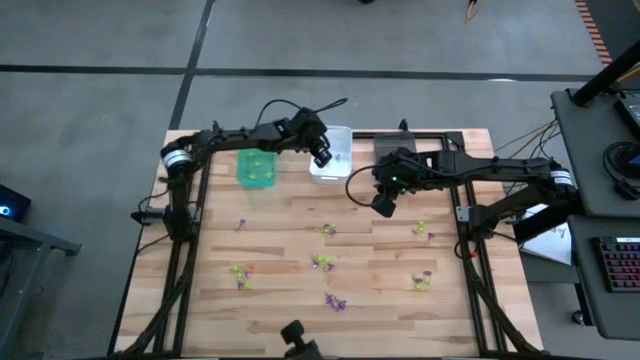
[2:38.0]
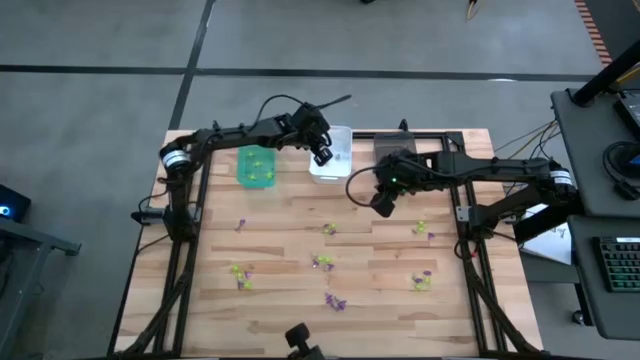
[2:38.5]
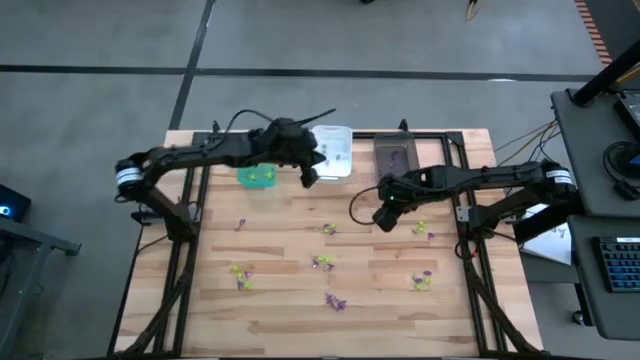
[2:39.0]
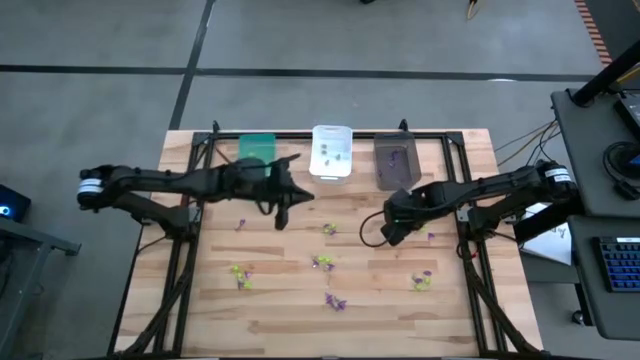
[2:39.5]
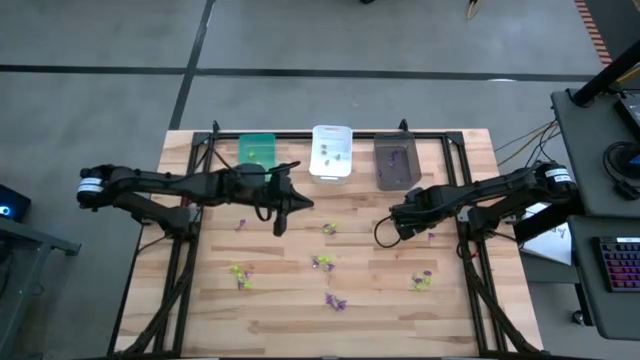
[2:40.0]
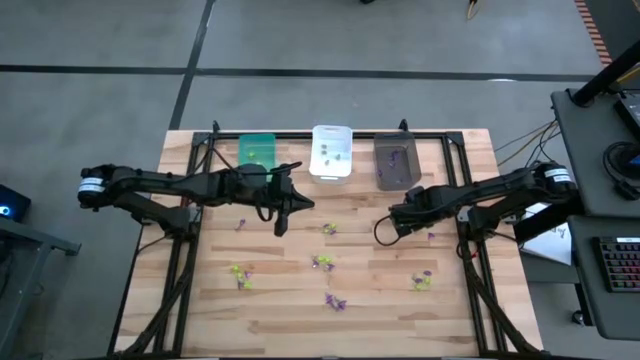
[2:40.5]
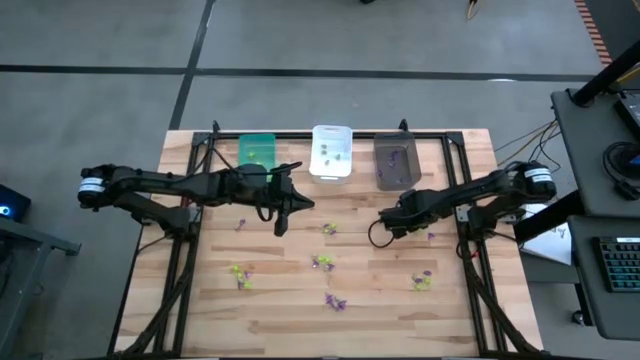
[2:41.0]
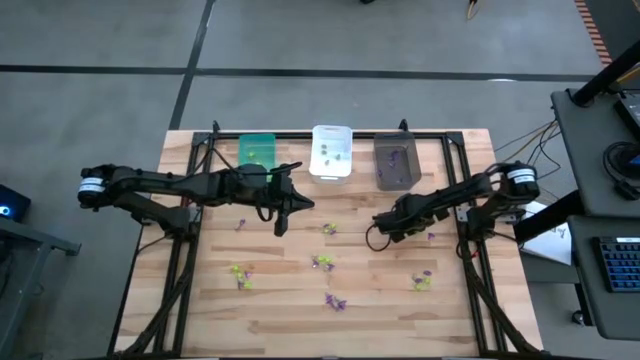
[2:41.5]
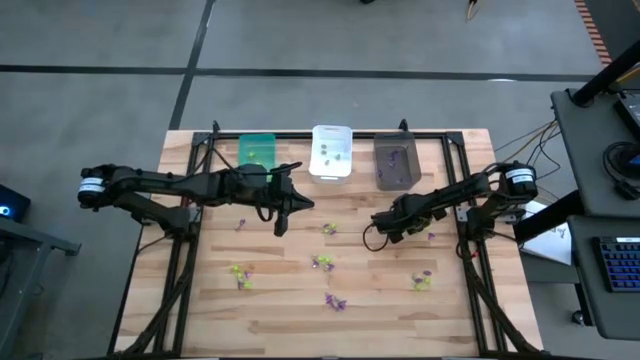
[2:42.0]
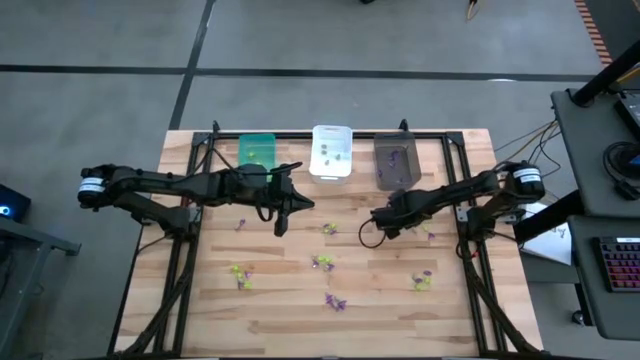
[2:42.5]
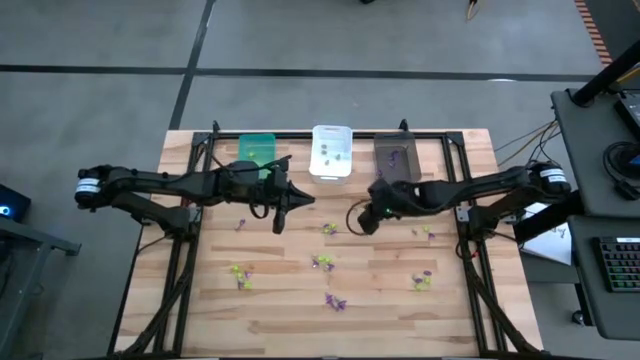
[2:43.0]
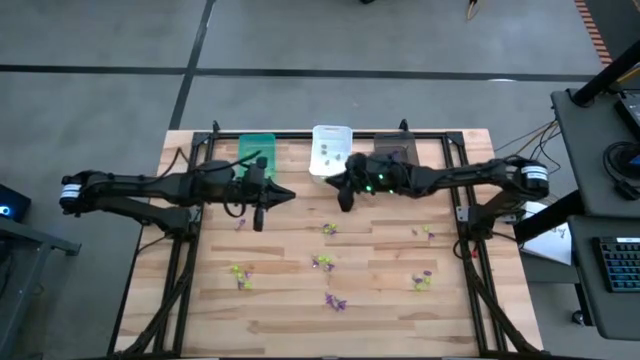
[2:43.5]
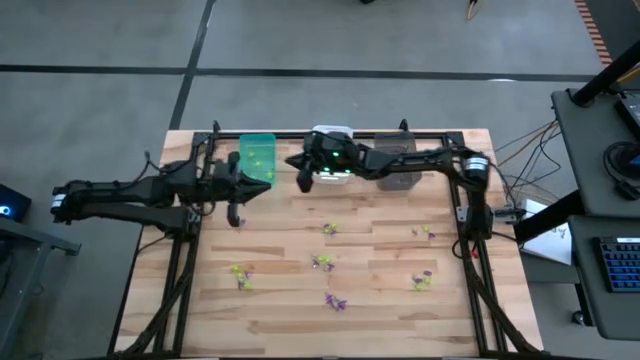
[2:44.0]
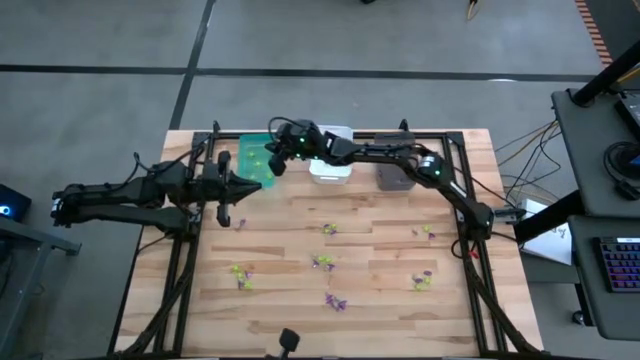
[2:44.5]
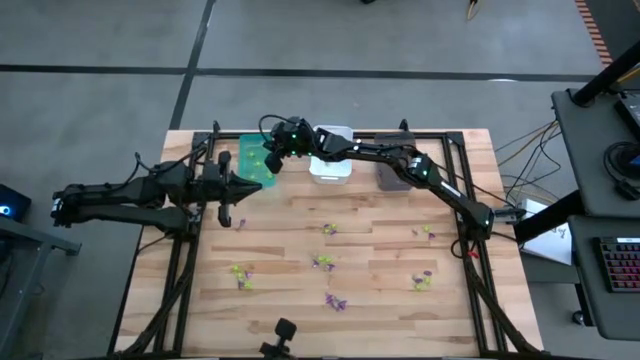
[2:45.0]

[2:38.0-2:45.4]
Task: Sort Halloween decoration
Put the green spider toy into the blue bin

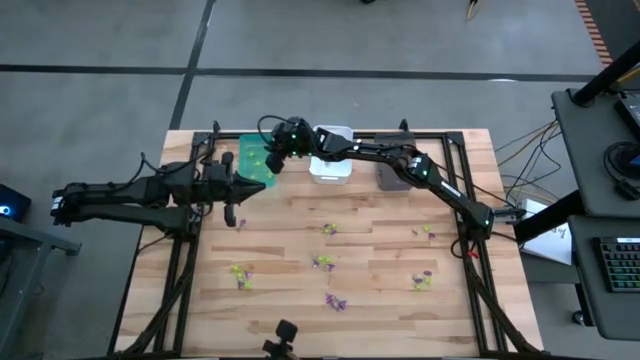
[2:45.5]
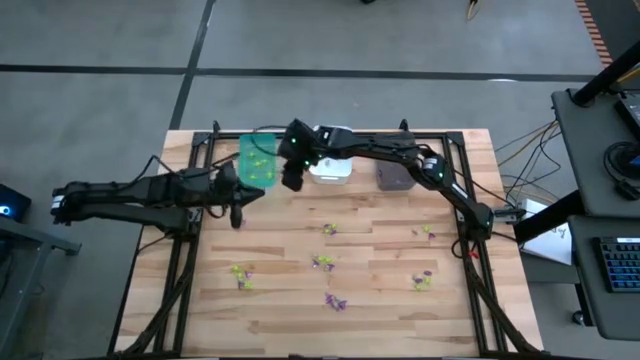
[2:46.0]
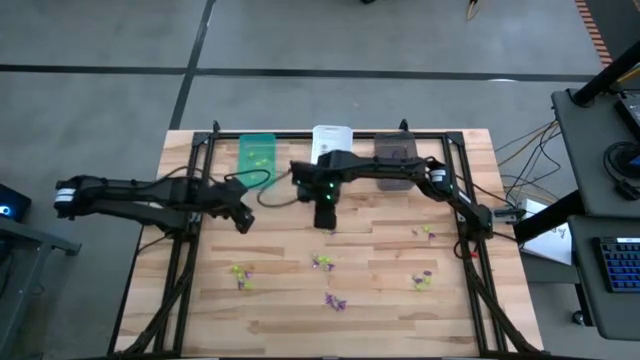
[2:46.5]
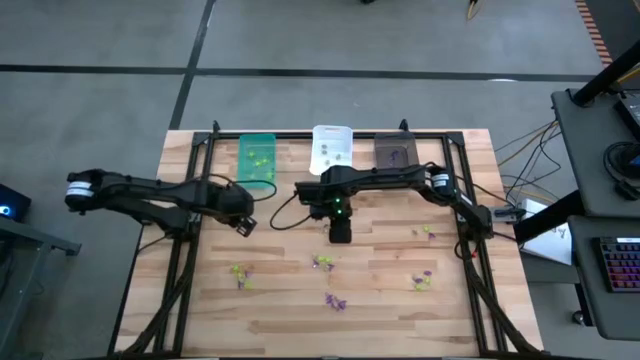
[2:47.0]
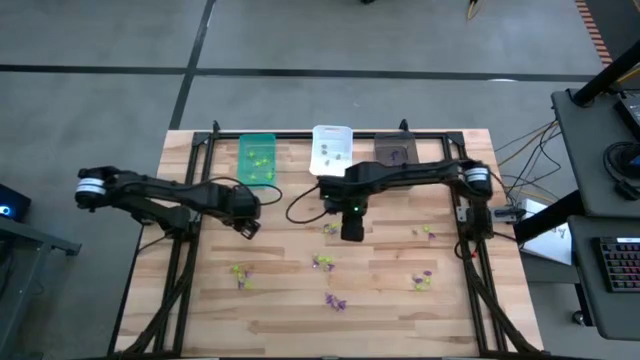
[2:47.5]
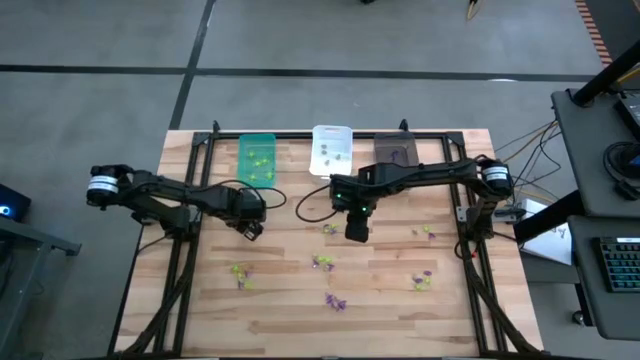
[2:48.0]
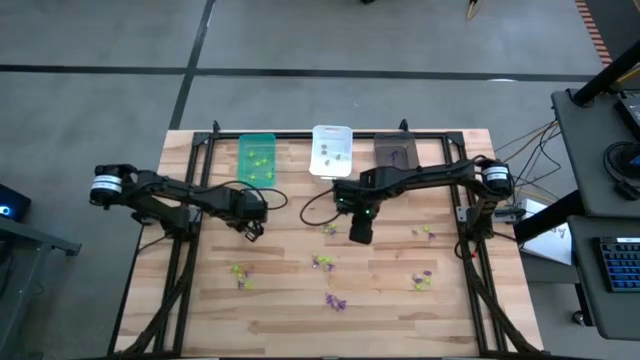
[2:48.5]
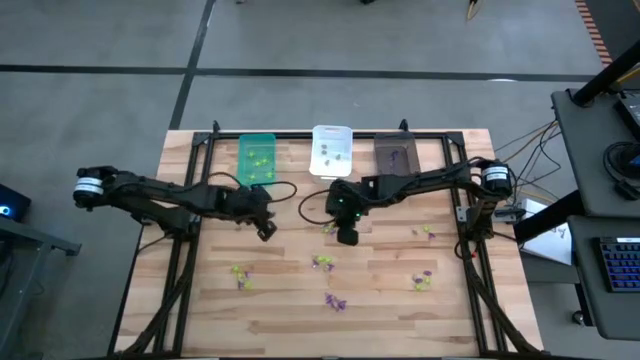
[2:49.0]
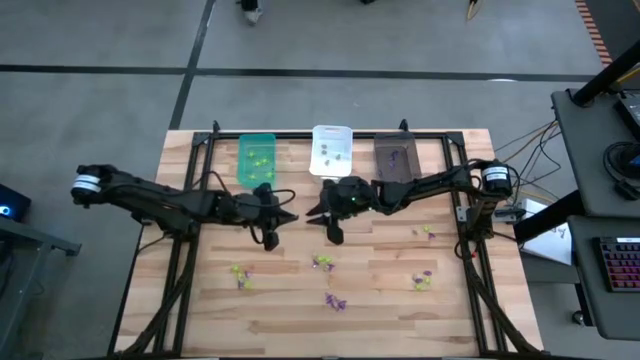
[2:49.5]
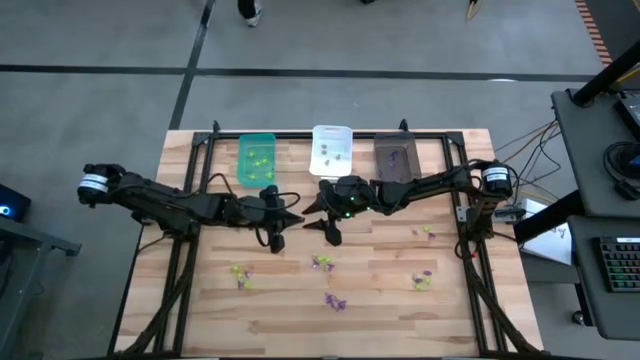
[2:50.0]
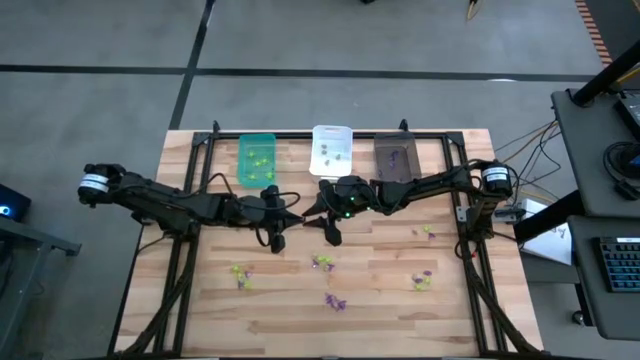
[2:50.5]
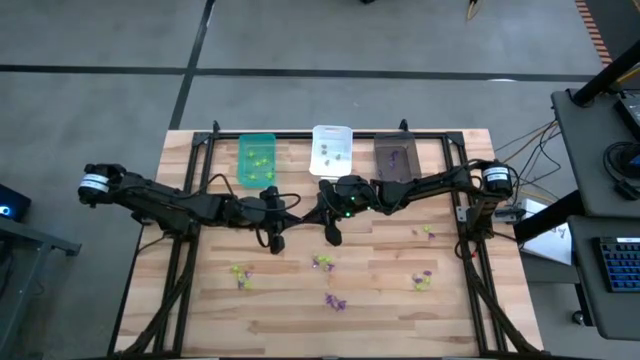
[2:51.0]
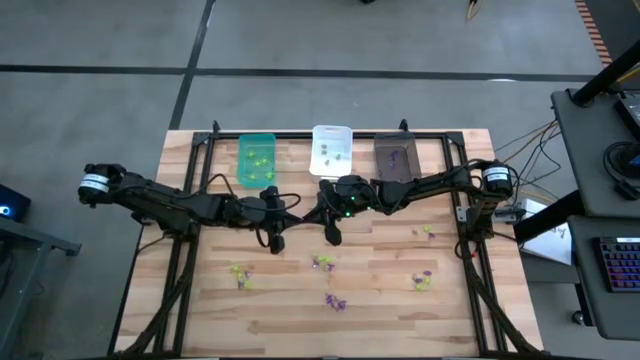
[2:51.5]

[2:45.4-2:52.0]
Put the purple witch hat toy into the gray bin

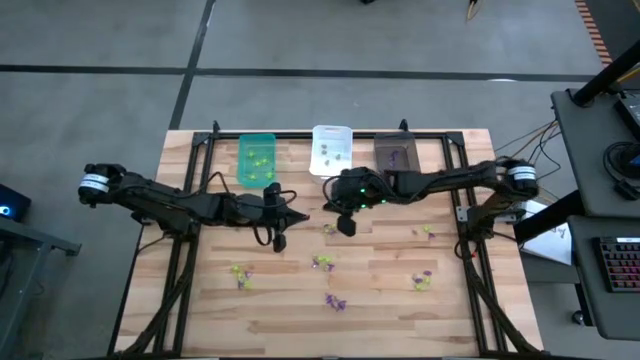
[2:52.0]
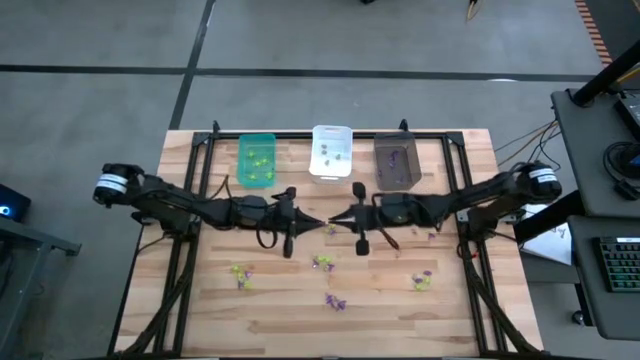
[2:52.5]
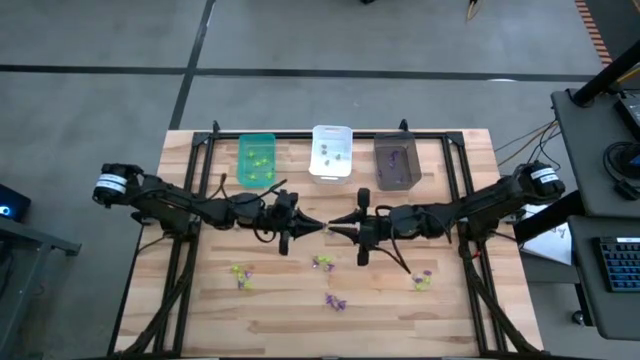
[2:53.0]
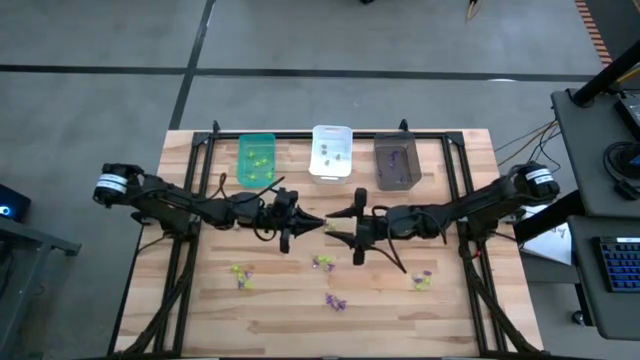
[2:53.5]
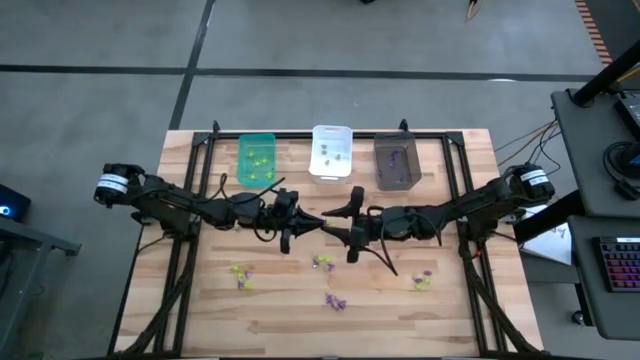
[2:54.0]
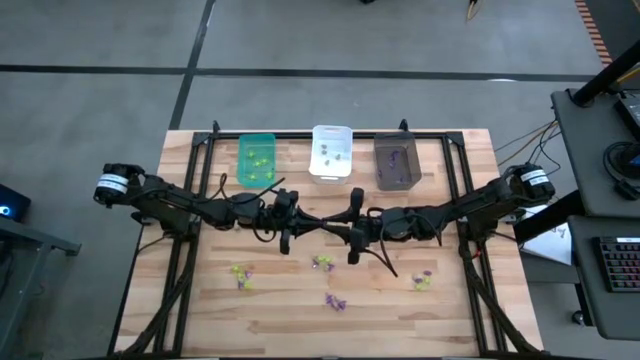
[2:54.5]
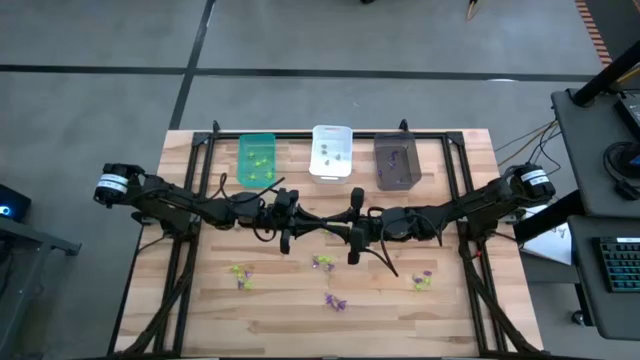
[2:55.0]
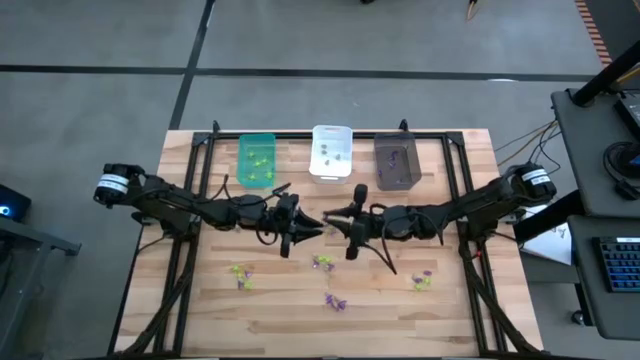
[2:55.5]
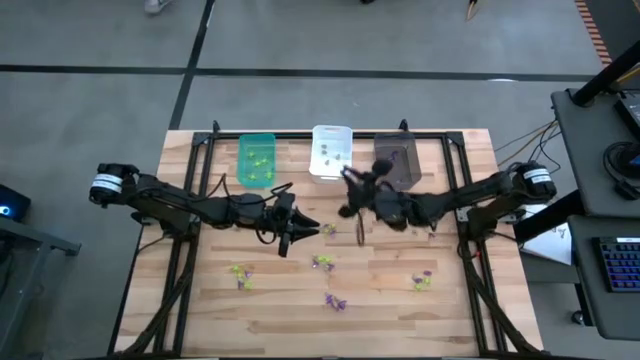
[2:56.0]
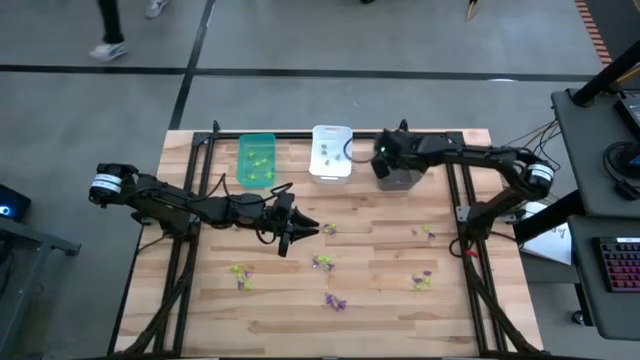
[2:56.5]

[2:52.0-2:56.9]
Put the purple witch hat toy into the gray bin
